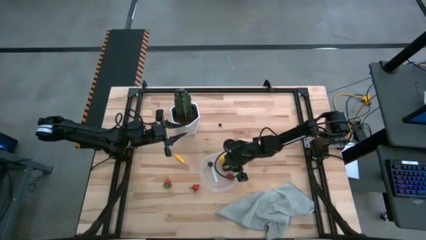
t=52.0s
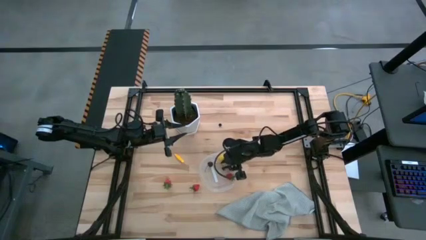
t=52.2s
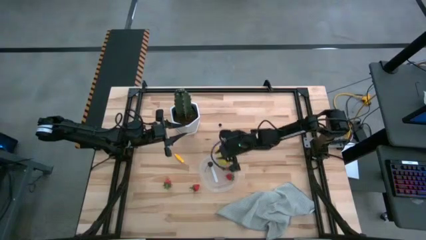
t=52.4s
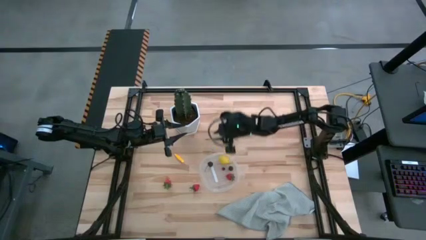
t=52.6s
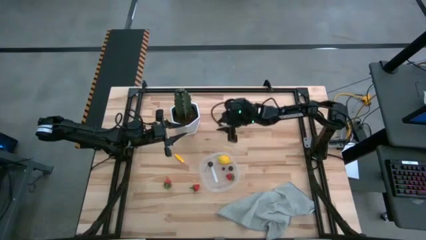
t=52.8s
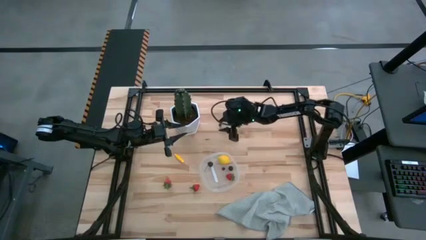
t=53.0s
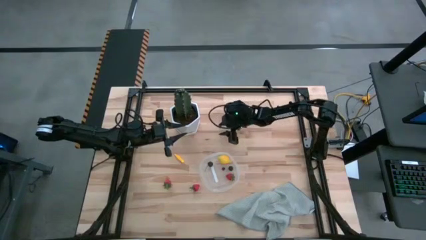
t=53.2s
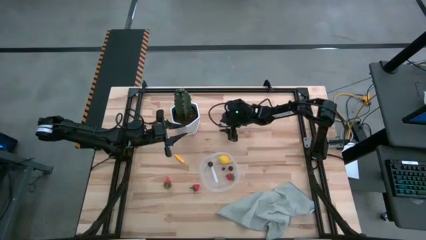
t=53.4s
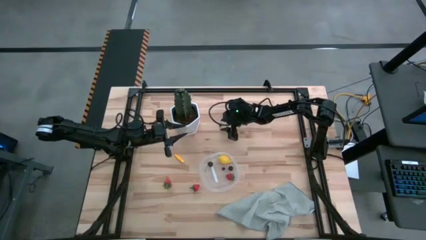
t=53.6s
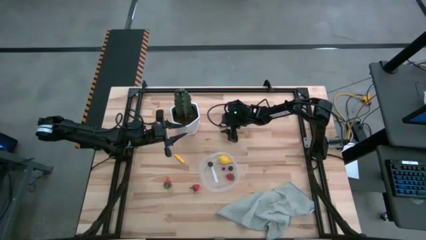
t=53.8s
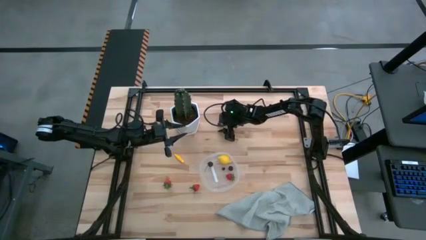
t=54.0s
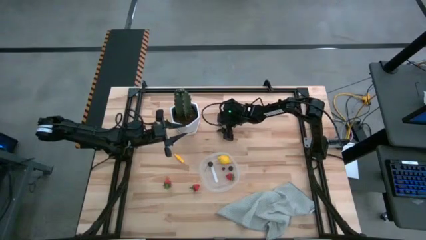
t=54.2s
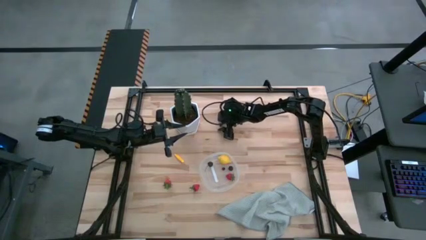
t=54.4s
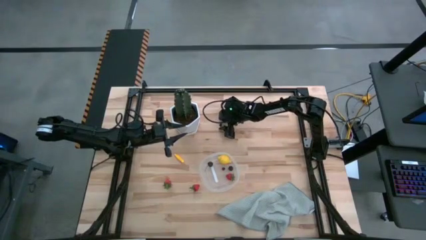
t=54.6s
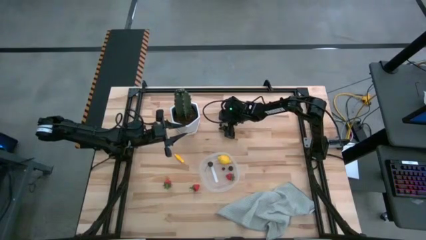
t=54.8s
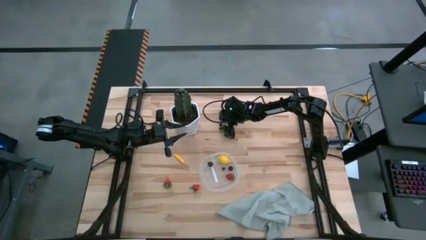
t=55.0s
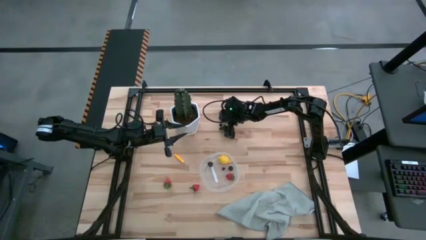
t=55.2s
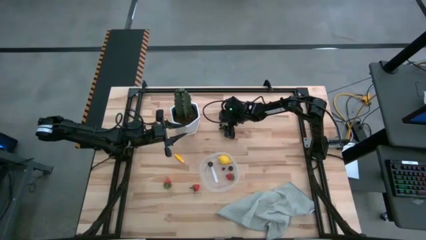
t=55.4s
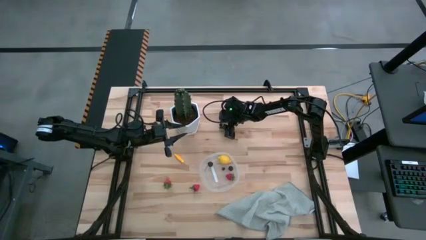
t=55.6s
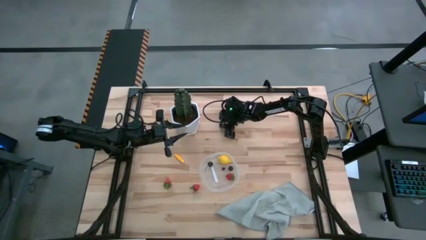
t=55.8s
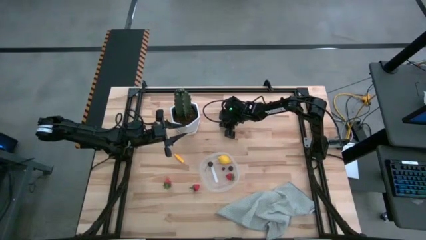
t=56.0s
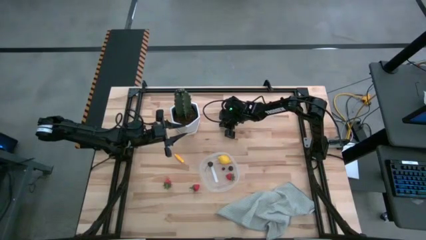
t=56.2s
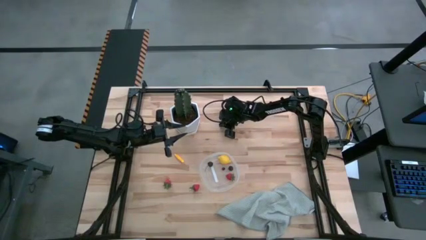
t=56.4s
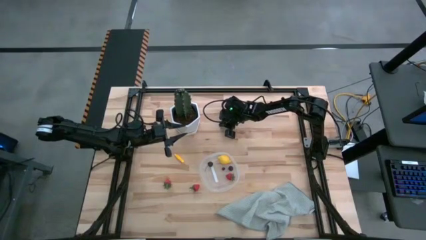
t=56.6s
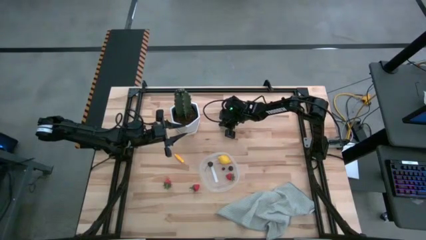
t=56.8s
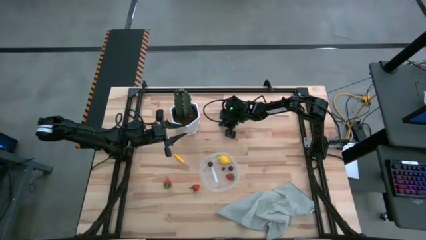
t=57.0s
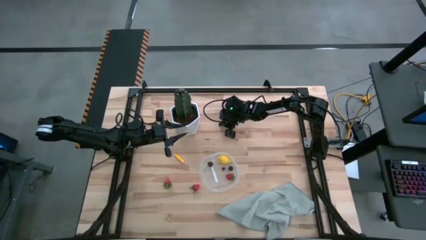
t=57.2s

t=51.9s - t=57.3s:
Task: Pick and placing Produce into tupperware
Put the blueberry into the transparent container

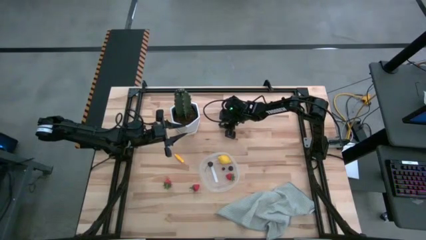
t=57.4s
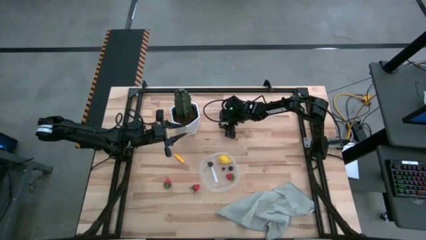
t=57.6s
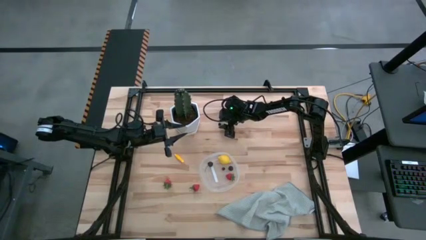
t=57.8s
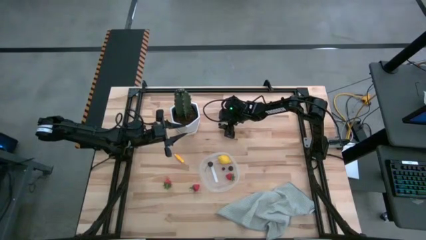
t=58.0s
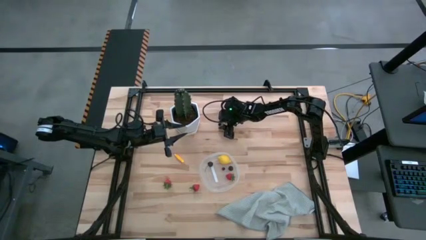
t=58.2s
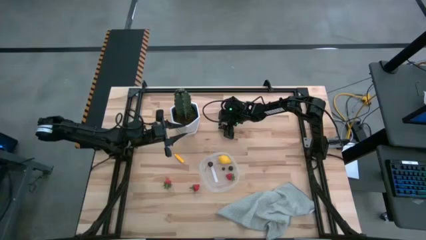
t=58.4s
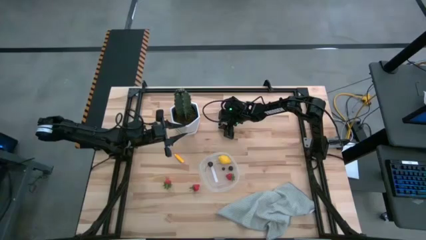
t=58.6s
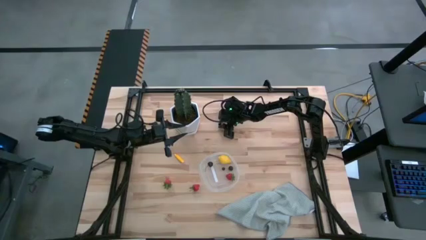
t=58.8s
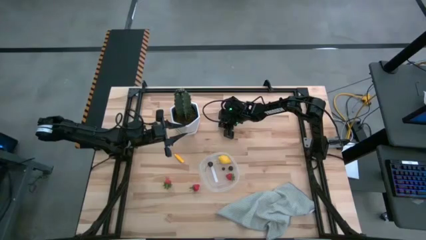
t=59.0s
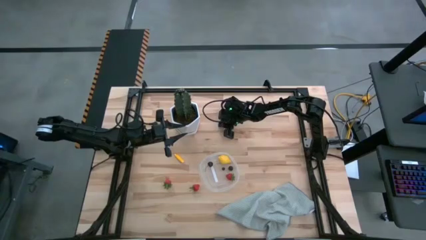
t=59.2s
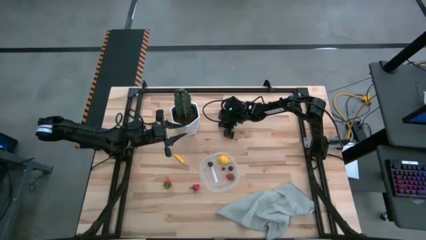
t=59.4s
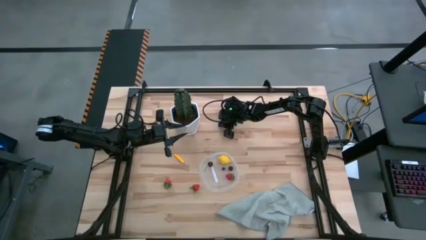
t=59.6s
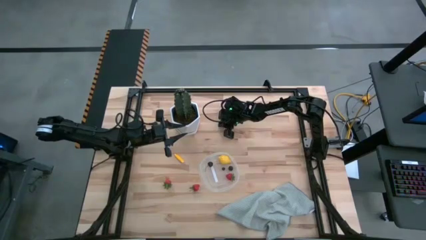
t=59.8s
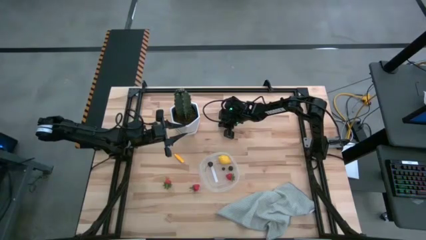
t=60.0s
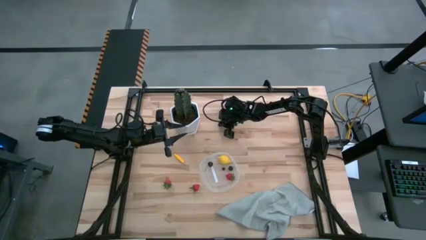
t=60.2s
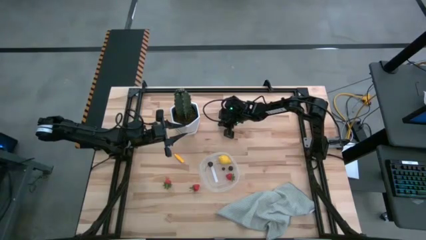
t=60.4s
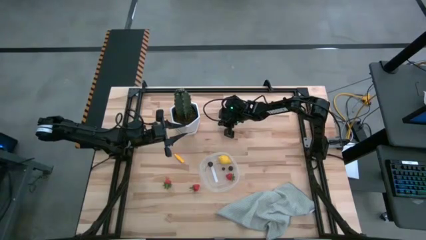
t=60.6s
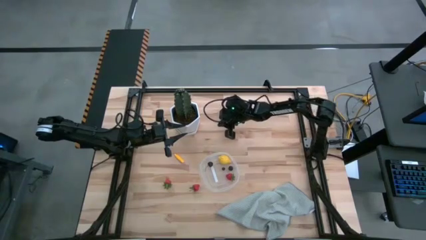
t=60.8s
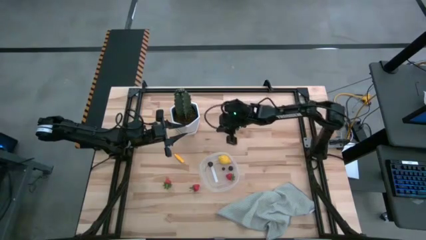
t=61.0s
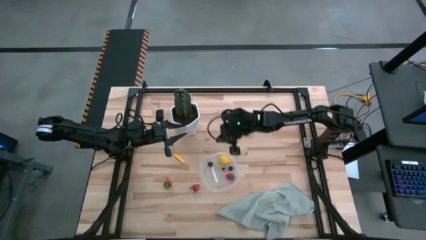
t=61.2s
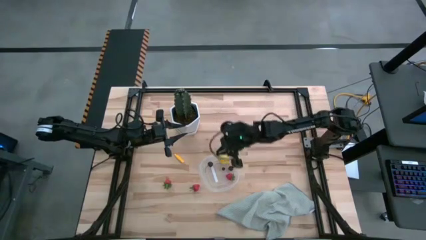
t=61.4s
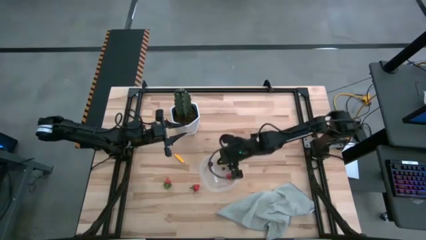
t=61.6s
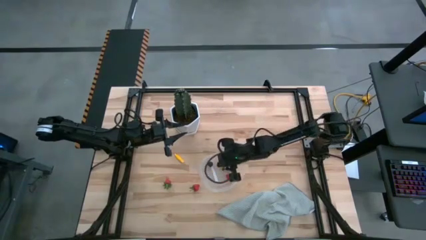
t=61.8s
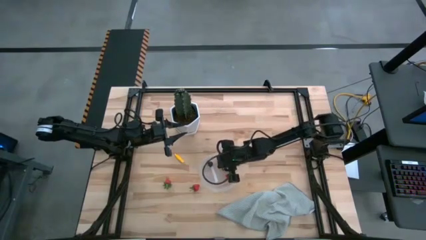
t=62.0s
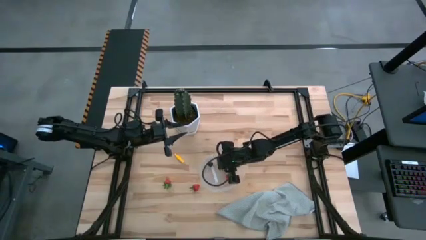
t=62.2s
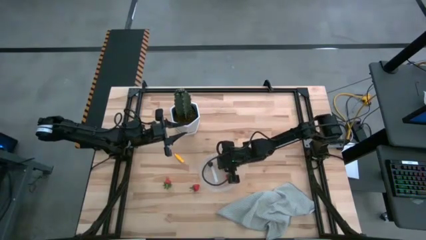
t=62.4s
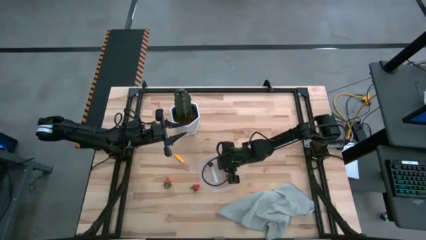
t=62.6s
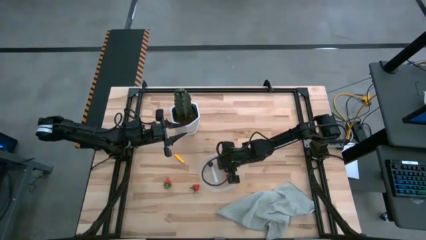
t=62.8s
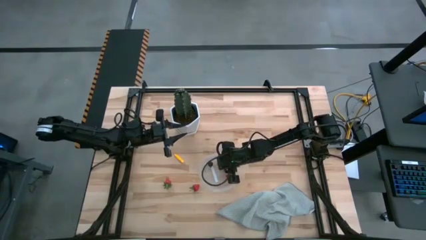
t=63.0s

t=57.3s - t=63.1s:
Put the blueberry into the transparent container

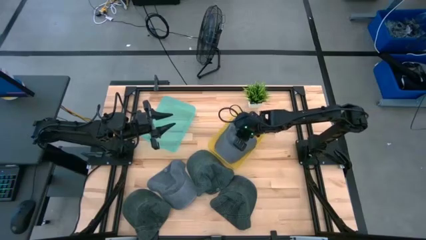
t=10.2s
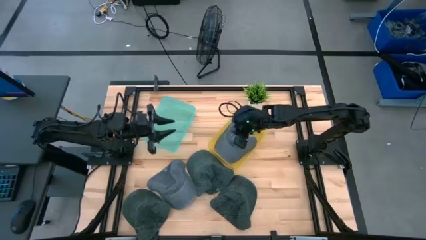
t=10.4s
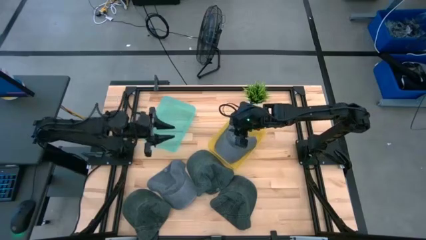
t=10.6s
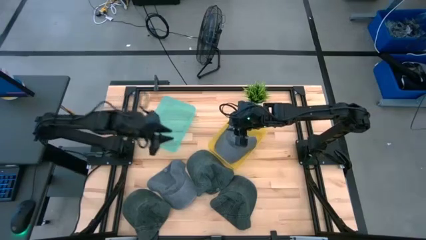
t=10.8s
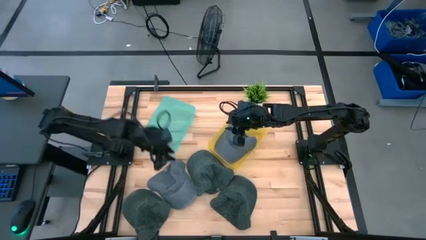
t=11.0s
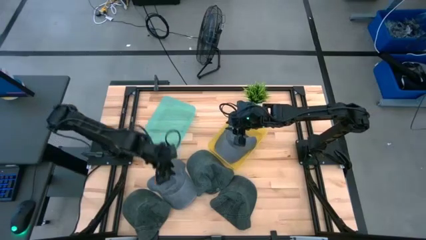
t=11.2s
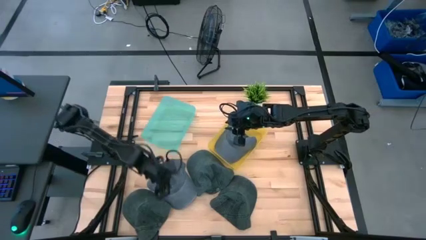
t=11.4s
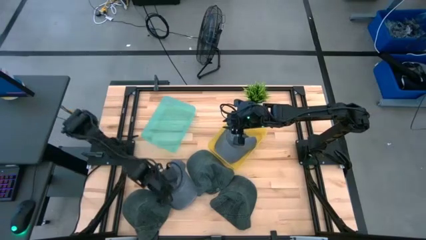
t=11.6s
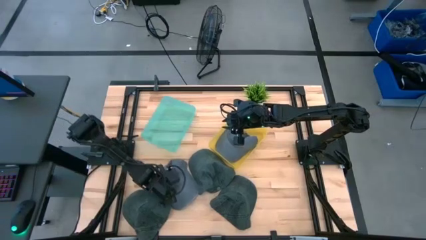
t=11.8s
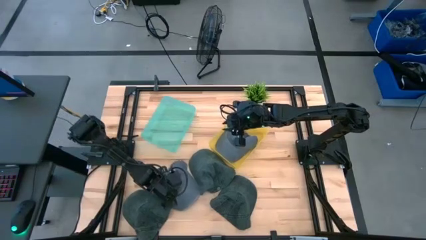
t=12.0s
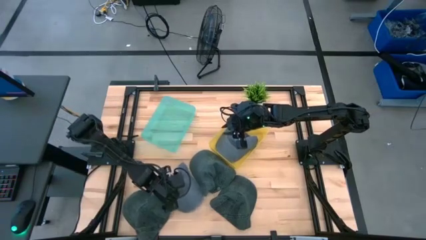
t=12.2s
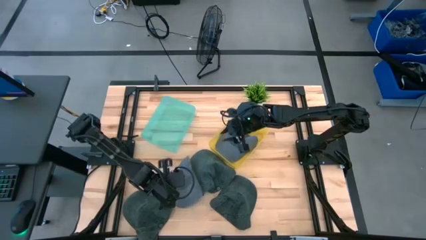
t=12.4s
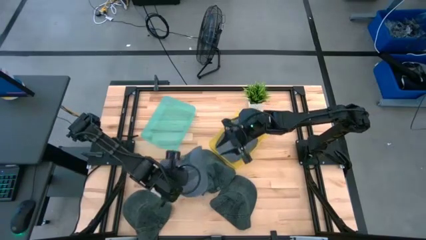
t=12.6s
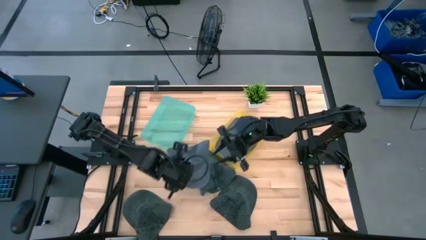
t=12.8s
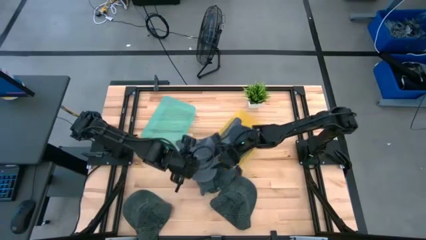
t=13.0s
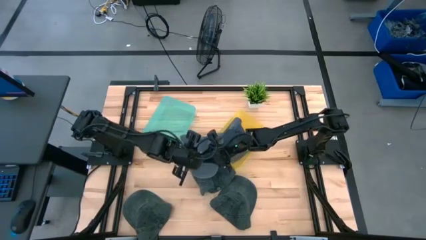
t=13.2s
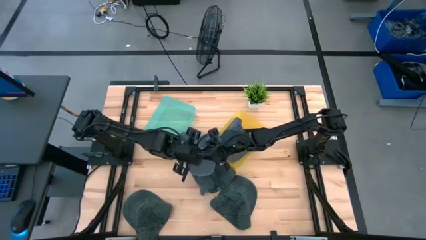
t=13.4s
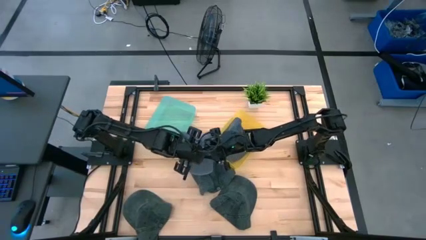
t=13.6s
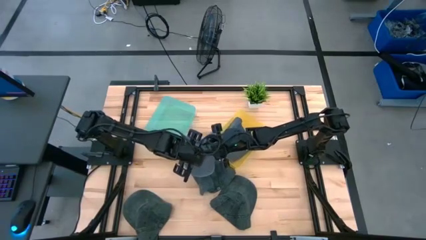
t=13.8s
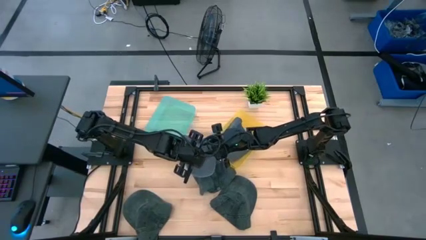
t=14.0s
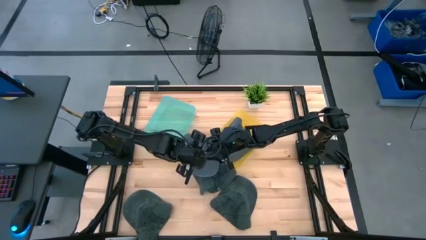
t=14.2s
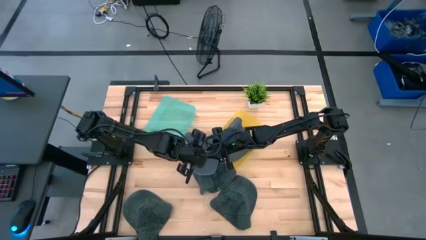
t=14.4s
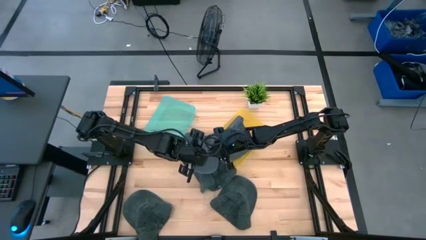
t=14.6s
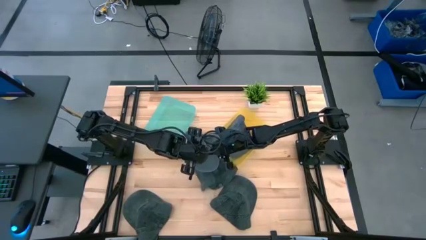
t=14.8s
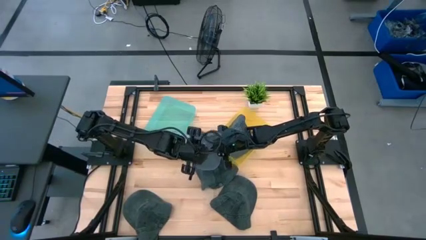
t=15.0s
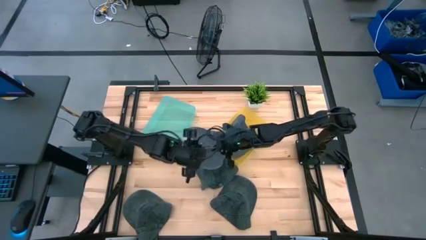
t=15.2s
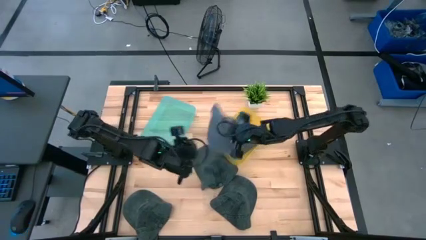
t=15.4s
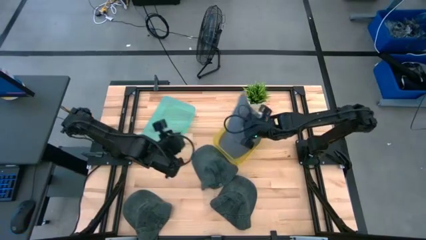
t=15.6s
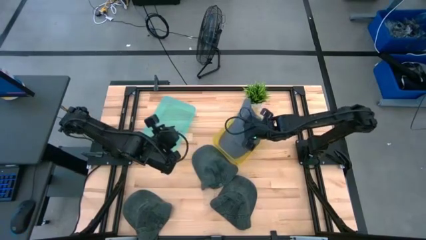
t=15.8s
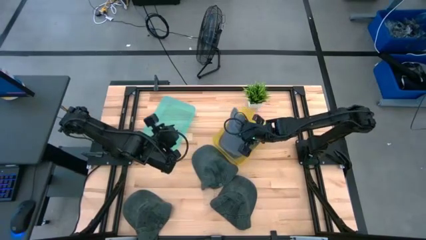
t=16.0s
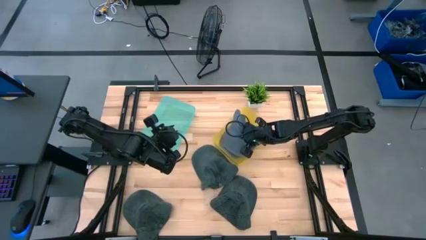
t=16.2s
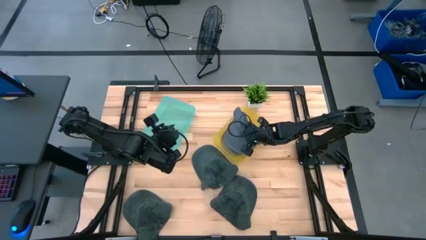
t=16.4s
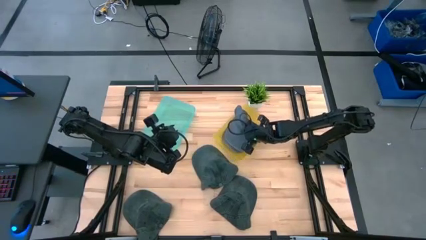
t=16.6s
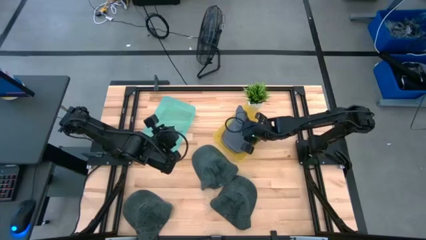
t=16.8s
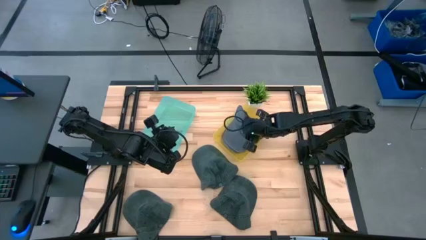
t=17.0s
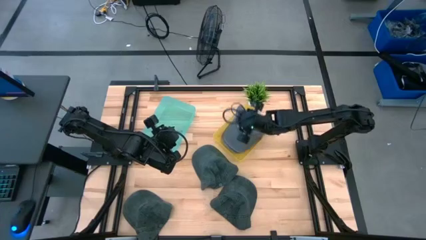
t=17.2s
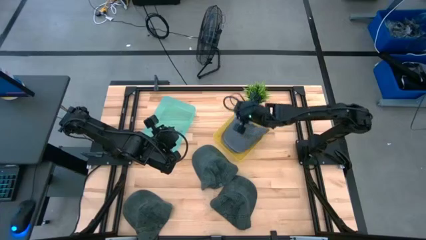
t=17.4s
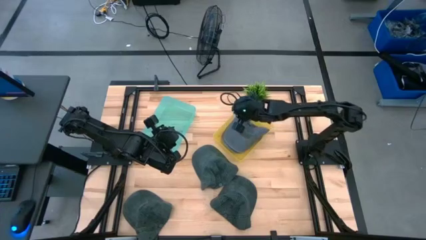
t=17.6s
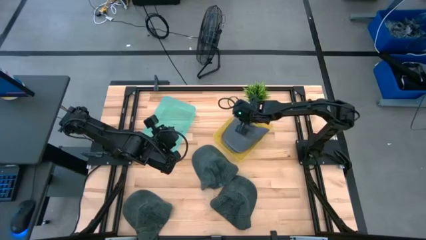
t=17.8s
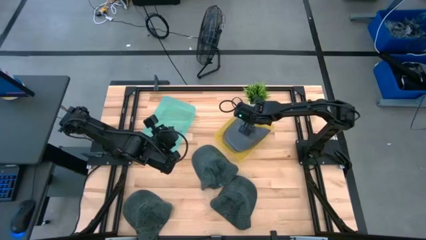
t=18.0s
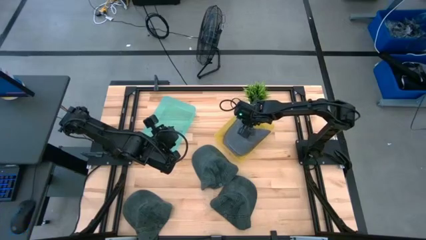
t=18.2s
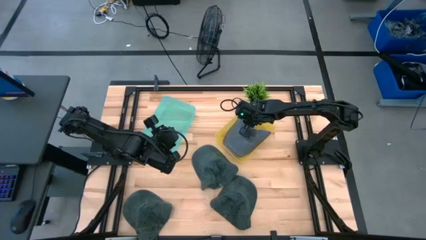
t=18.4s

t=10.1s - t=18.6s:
Task: Pick & Place hat
Put the blue cap into the yellow basket
